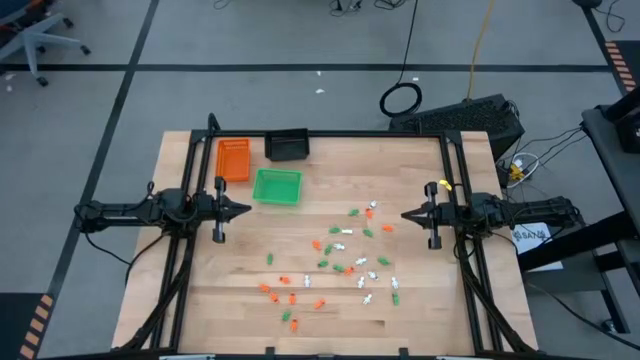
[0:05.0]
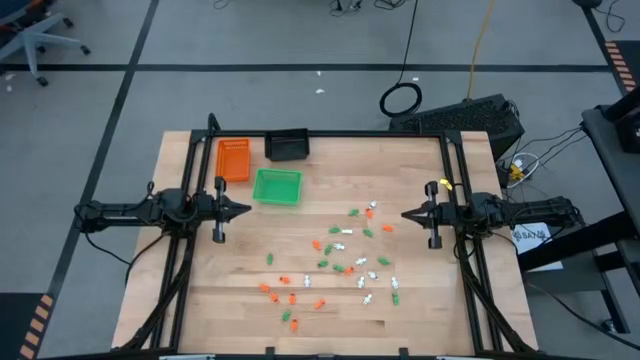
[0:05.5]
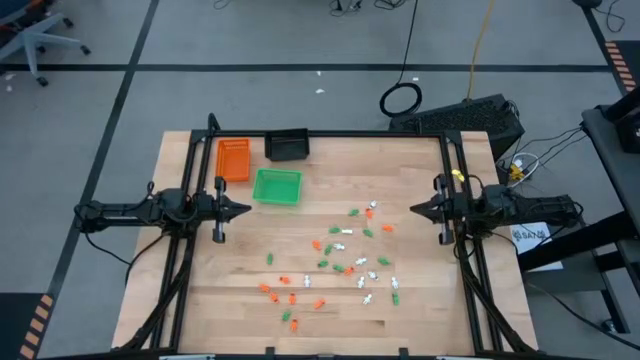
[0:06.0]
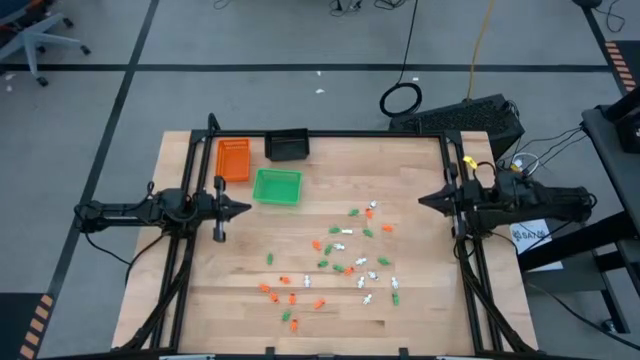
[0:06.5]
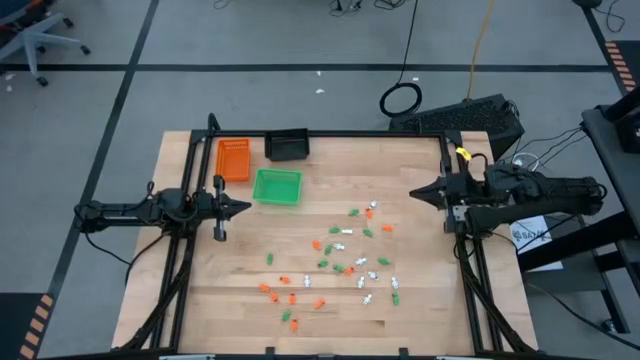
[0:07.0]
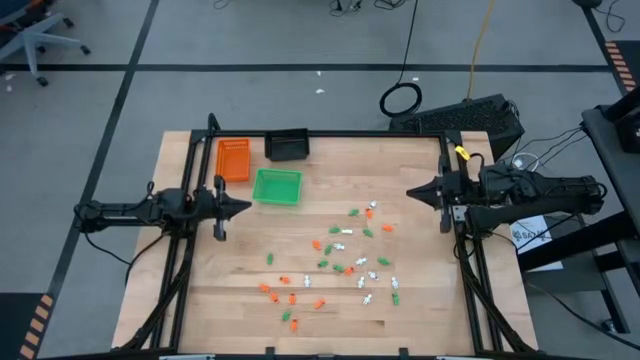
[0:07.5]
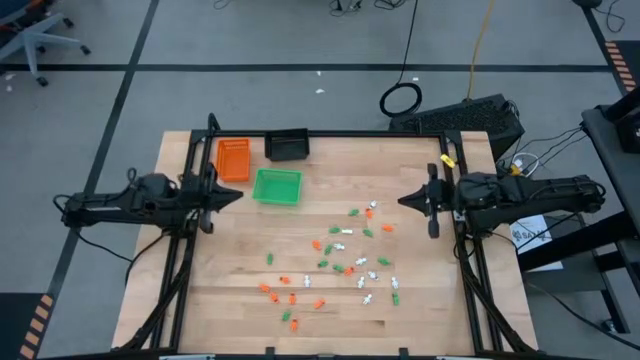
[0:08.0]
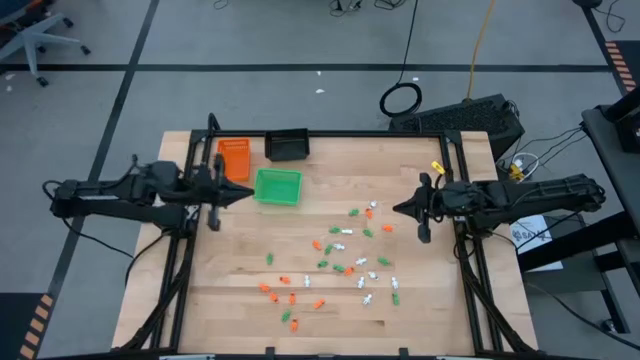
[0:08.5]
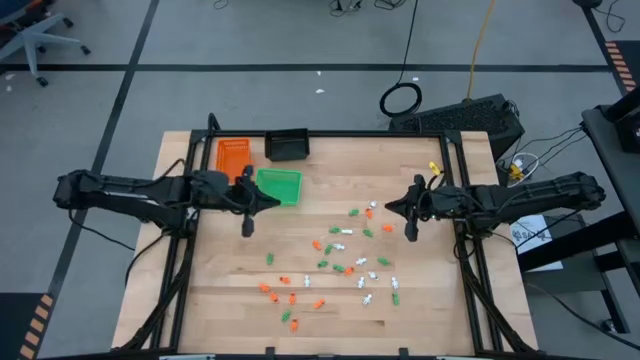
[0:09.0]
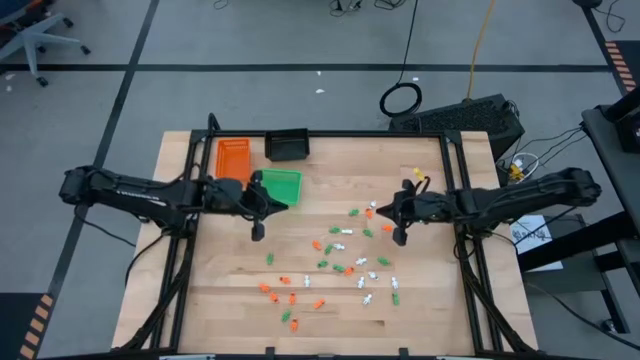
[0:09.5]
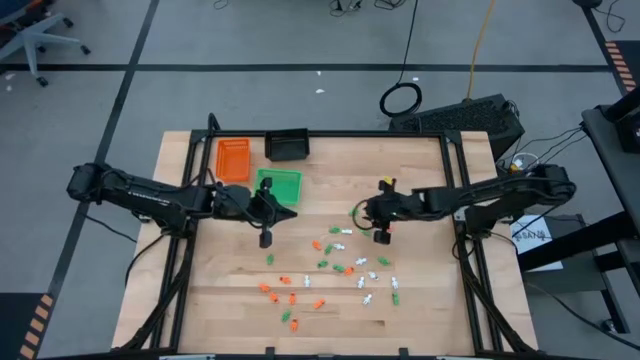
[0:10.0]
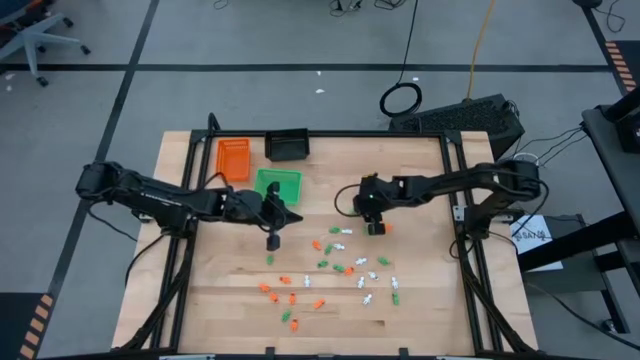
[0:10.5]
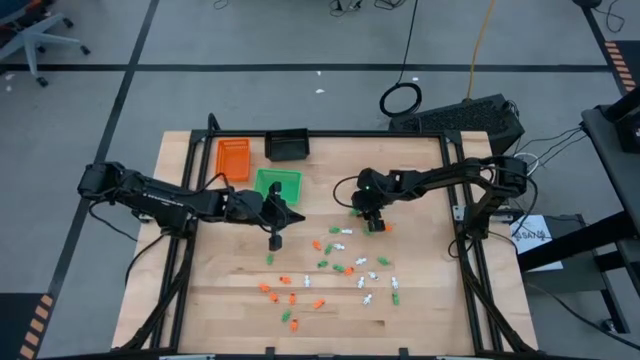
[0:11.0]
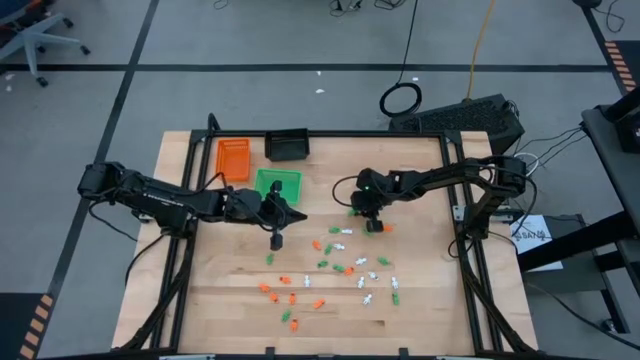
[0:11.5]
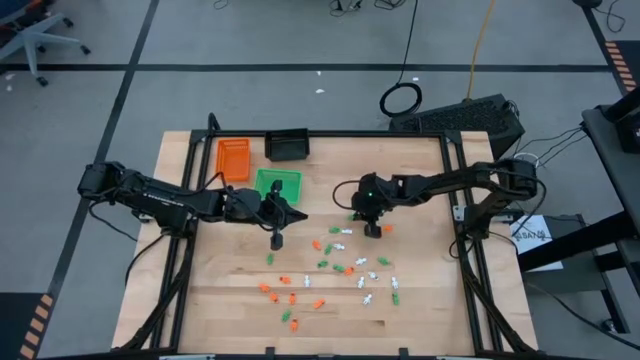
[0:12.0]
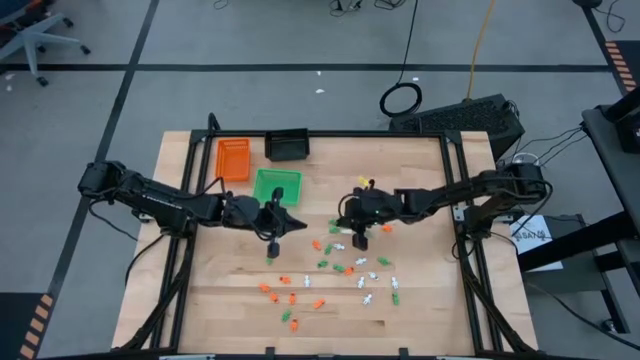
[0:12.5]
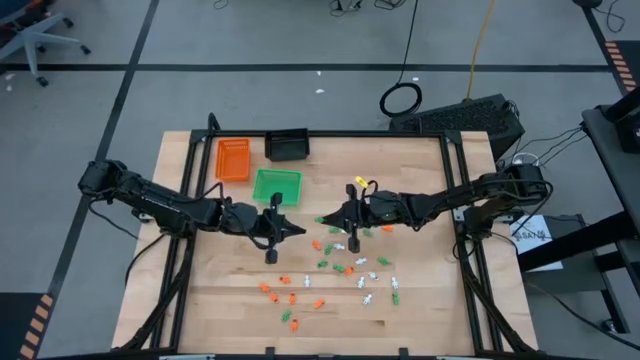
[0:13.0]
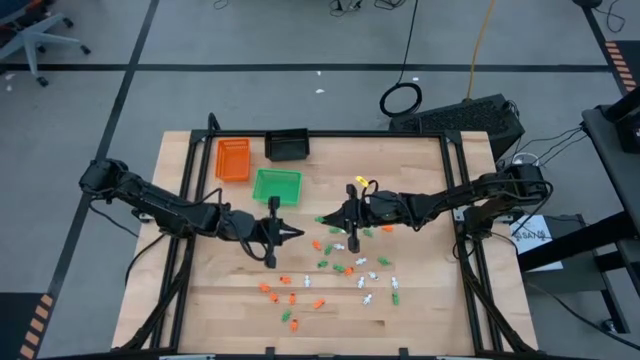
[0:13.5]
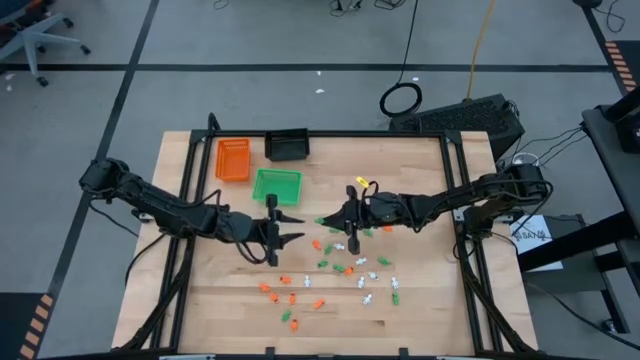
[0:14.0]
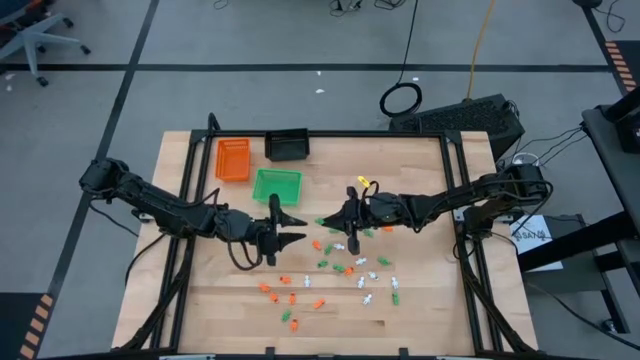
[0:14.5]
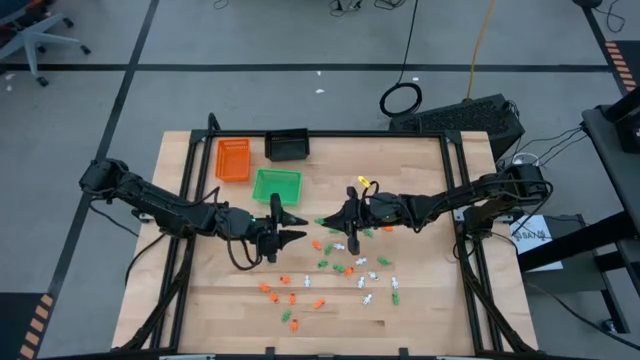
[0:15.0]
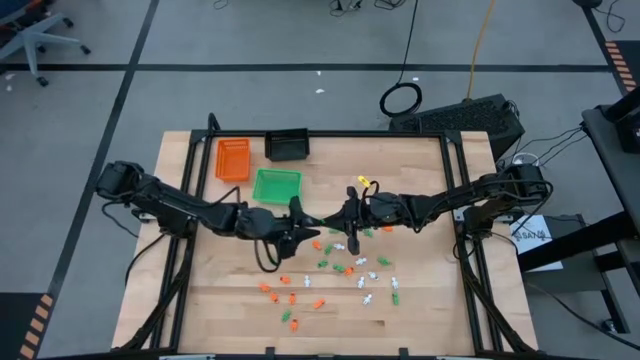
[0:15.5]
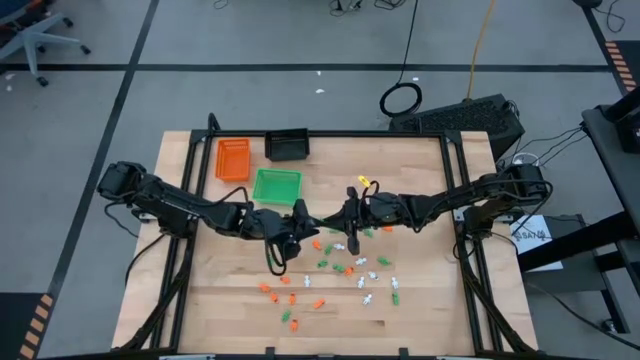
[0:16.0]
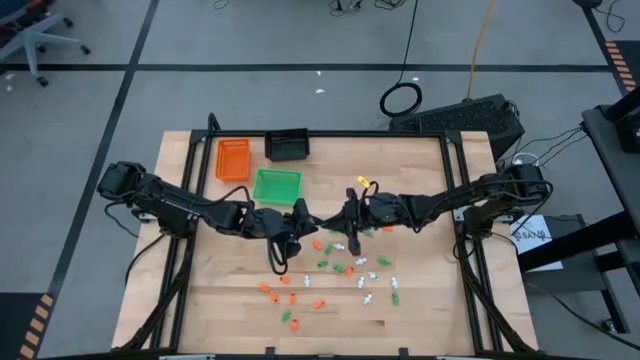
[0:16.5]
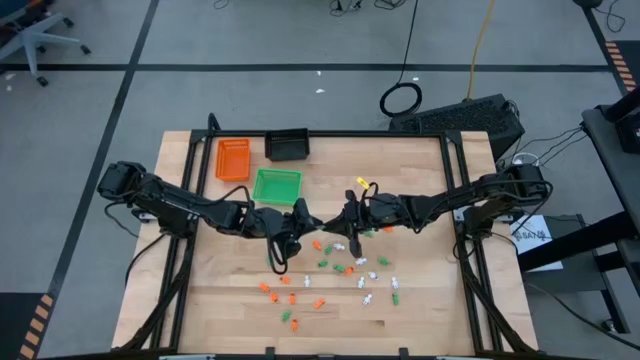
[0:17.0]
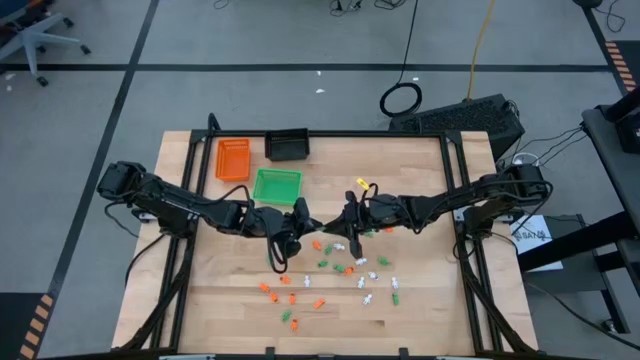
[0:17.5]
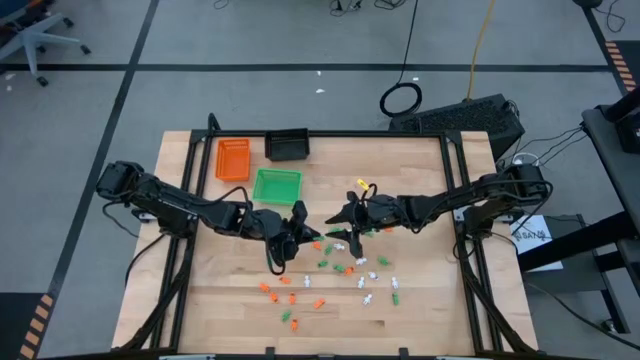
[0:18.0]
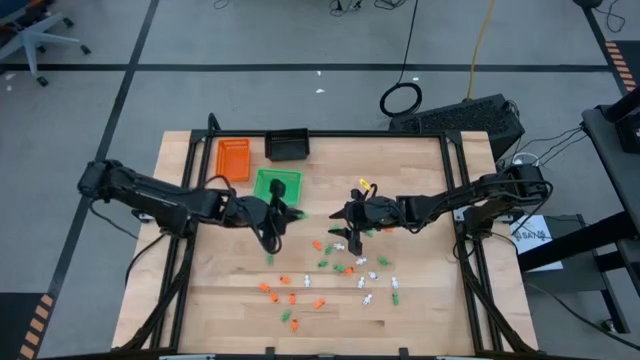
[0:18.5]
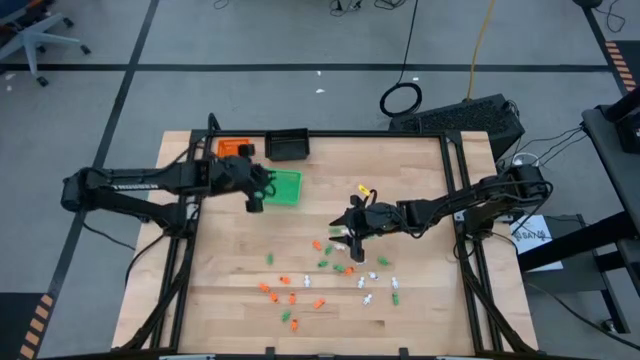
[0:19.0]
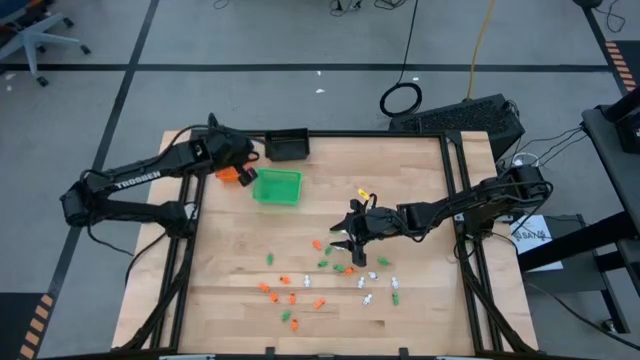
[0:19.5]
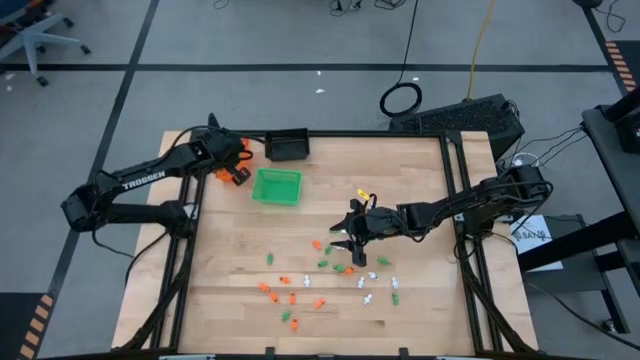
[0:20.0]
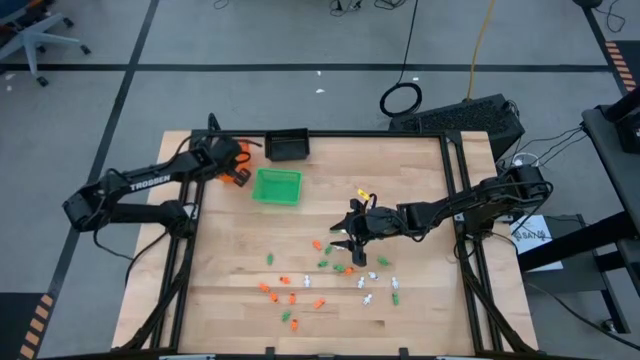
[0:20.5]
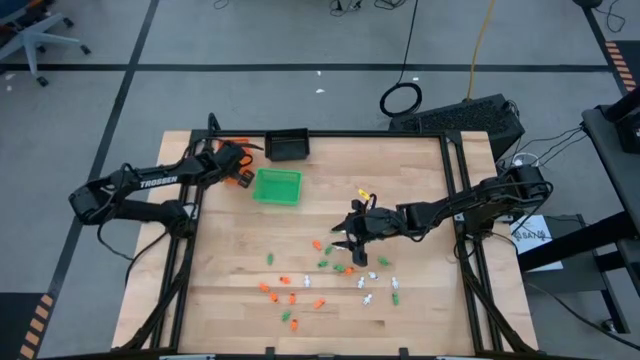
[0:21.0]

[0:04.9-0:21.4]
Task: Sort Halloween decoration
Put the green skeleton toy into the orange bin

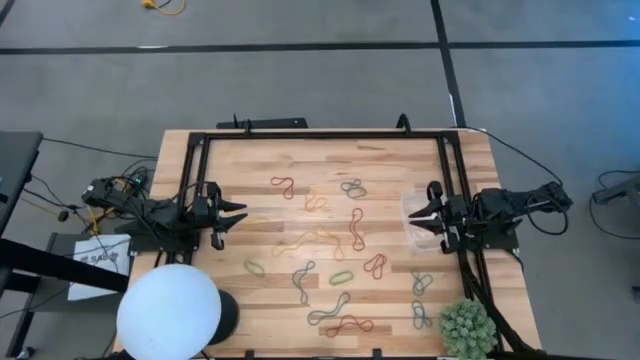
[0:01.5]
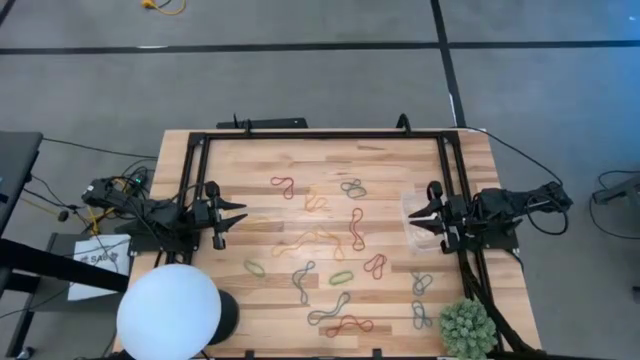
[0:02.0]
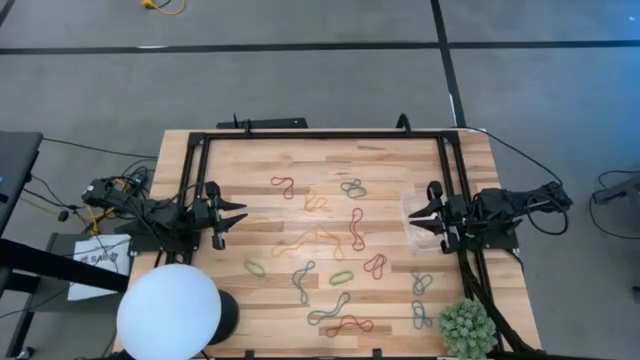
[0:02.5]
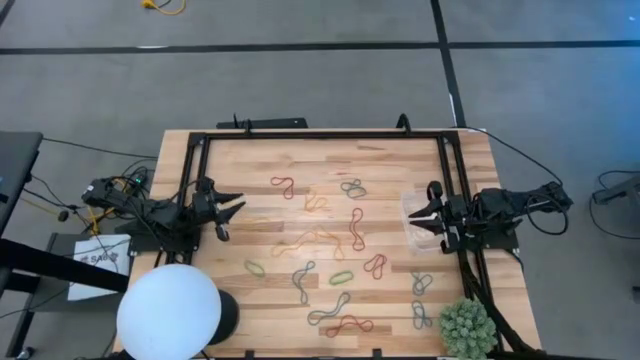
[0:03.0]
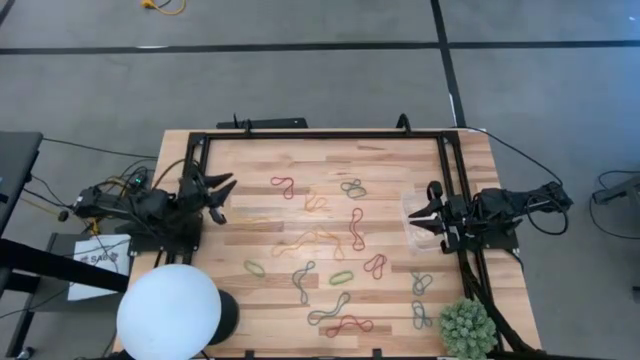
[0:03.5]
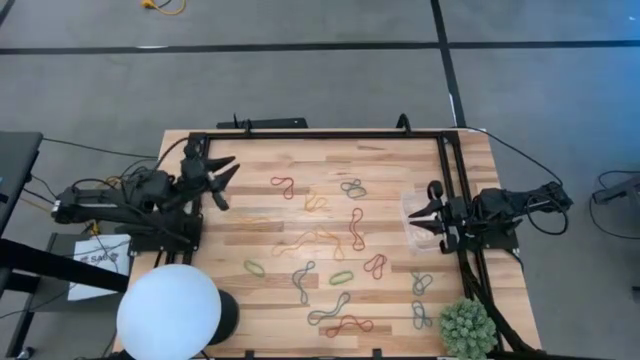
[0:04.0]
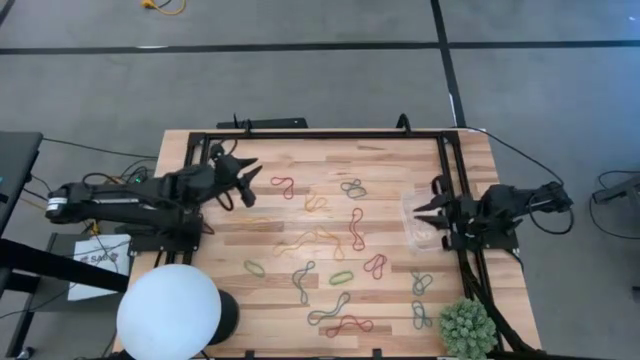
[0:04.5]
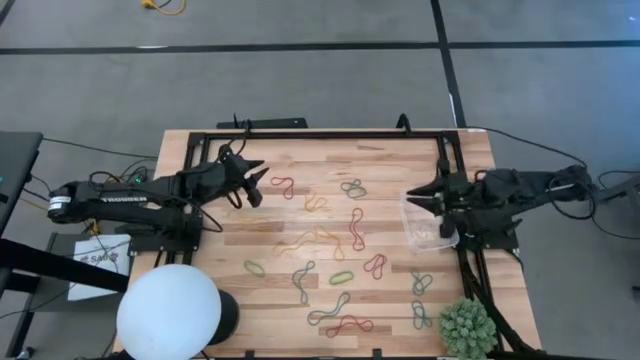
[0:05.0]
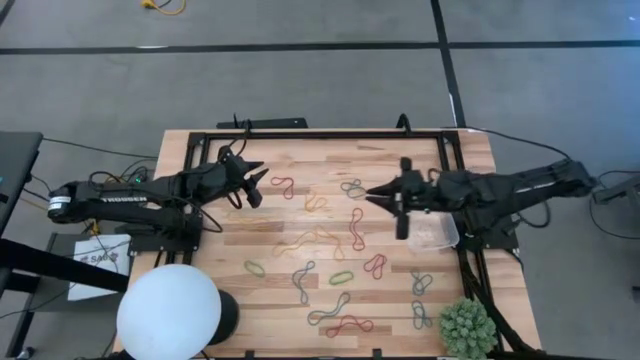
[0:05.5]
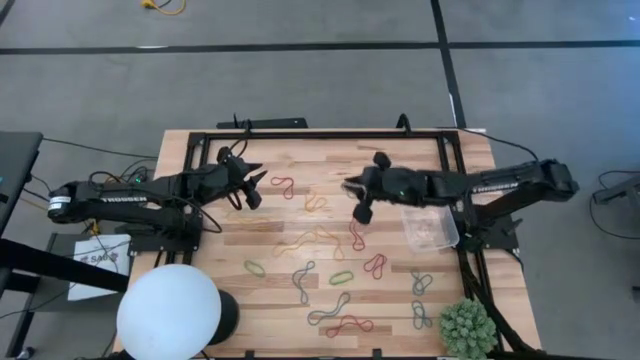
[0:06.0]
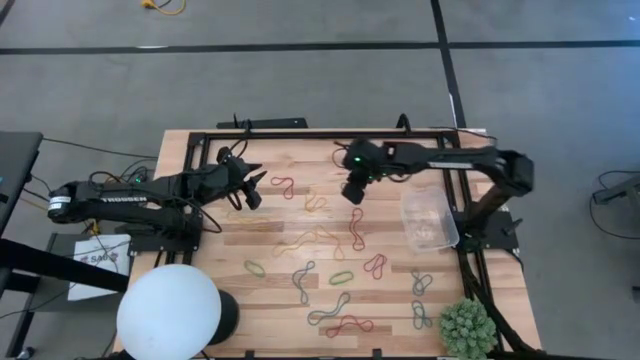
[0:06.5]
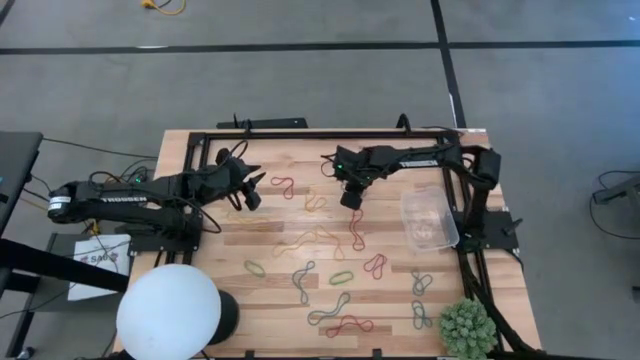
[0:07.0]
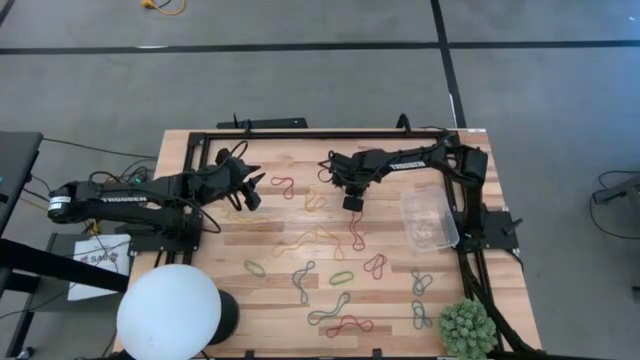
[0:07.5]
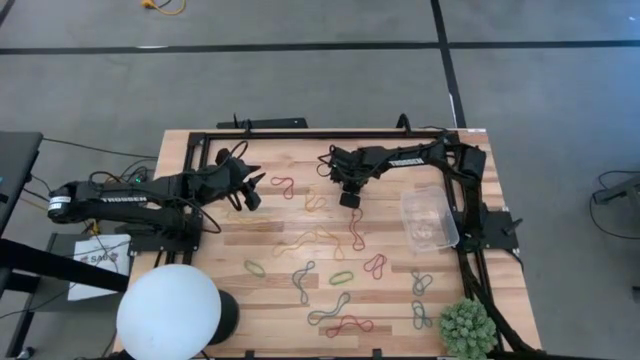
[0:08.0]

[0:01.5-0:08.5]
Task: Pick and place items into bin
Put the blue rubber band into the transparent bin
